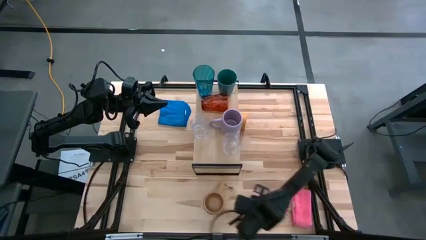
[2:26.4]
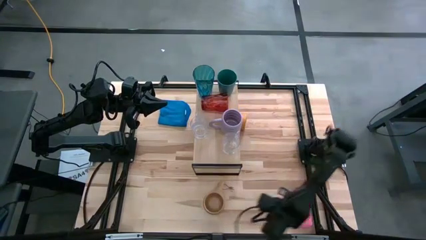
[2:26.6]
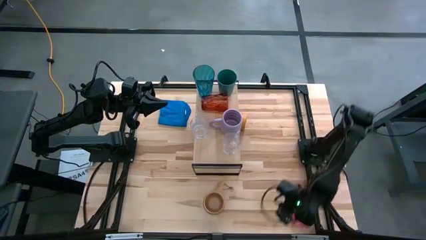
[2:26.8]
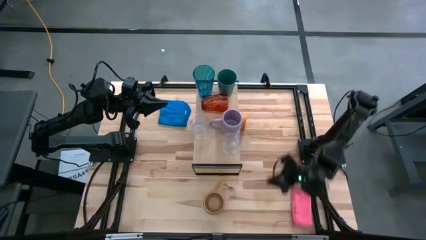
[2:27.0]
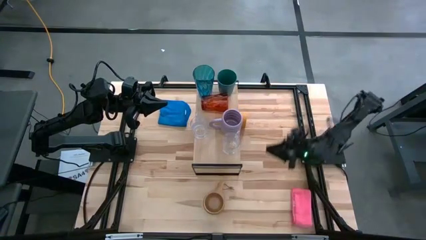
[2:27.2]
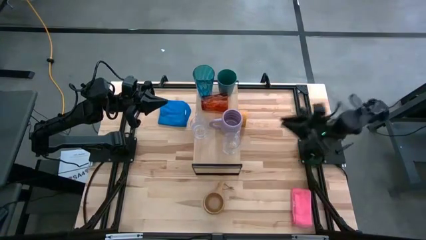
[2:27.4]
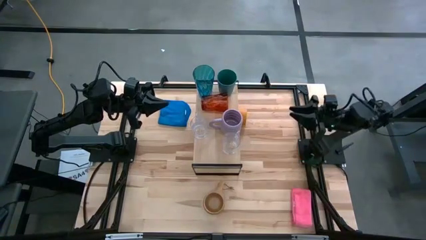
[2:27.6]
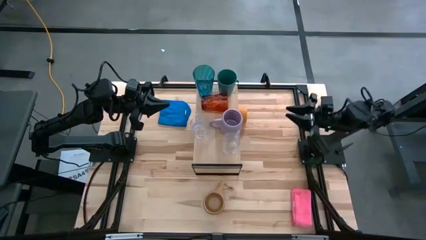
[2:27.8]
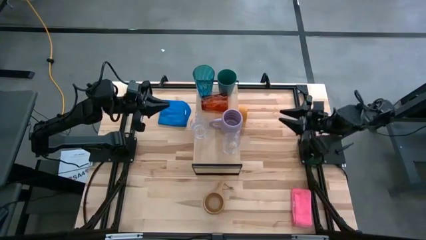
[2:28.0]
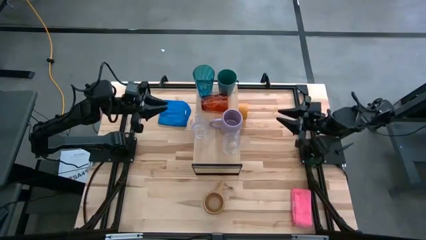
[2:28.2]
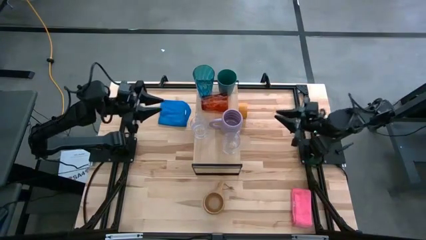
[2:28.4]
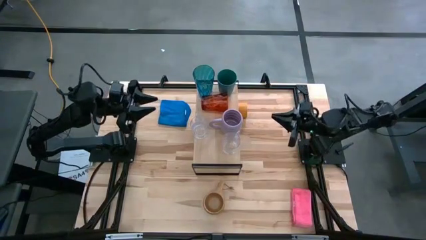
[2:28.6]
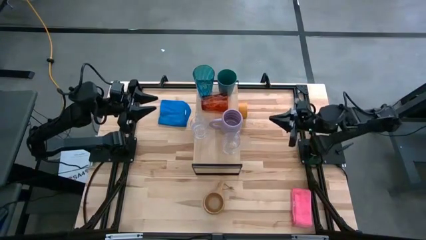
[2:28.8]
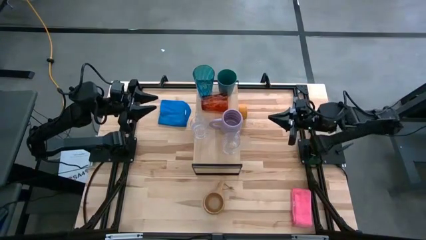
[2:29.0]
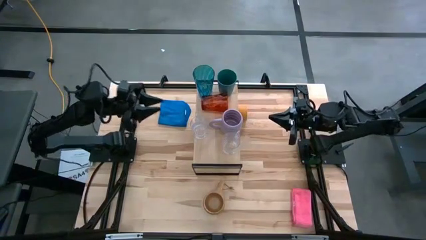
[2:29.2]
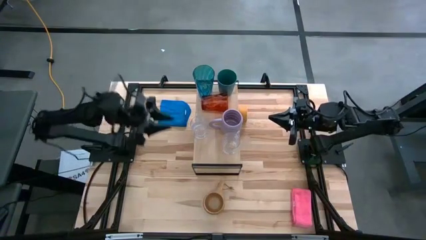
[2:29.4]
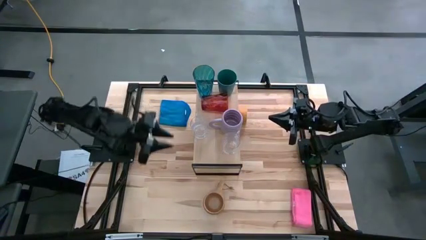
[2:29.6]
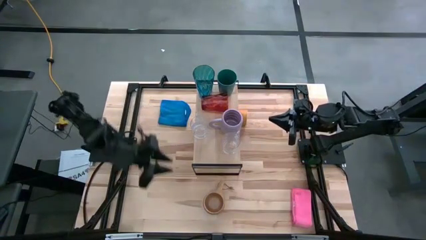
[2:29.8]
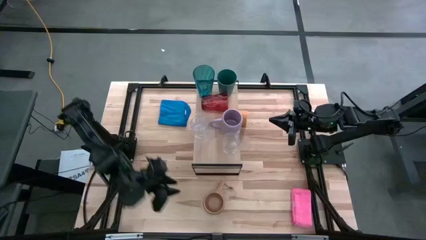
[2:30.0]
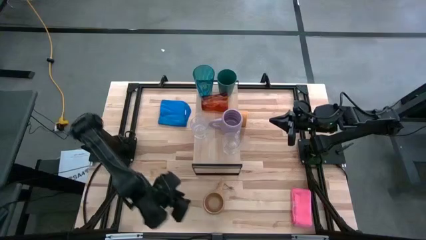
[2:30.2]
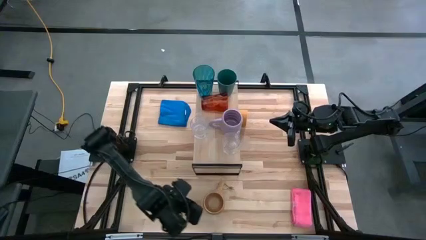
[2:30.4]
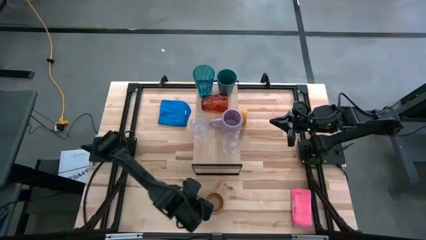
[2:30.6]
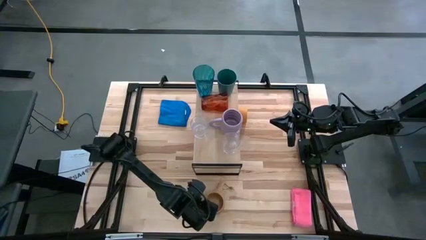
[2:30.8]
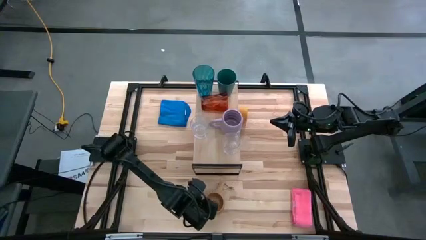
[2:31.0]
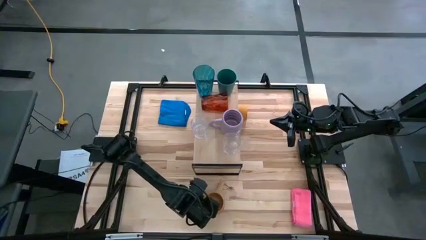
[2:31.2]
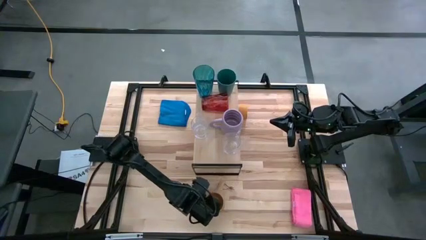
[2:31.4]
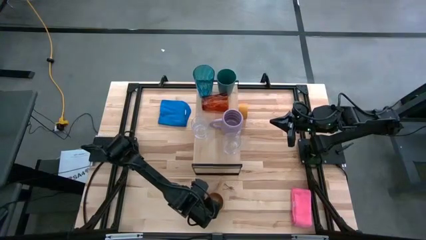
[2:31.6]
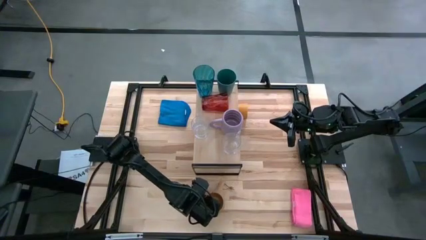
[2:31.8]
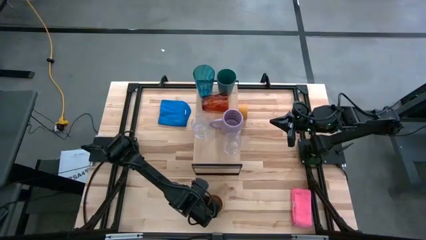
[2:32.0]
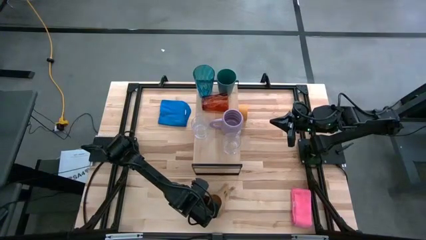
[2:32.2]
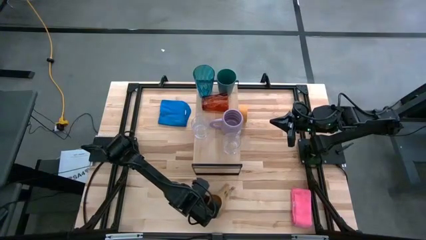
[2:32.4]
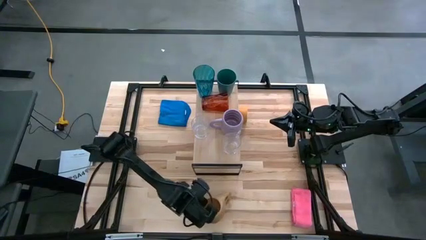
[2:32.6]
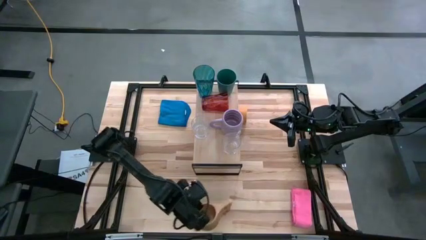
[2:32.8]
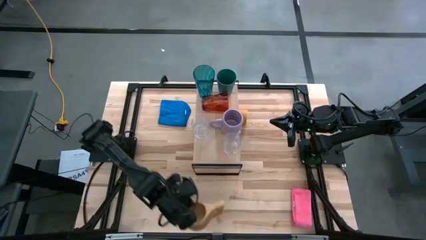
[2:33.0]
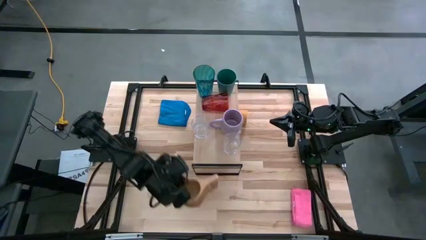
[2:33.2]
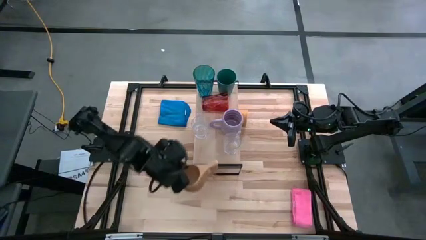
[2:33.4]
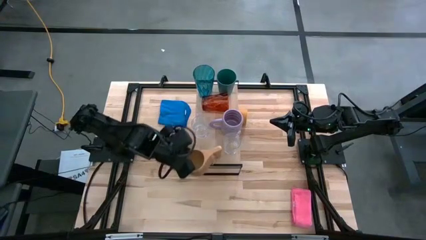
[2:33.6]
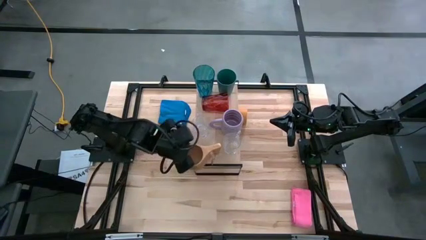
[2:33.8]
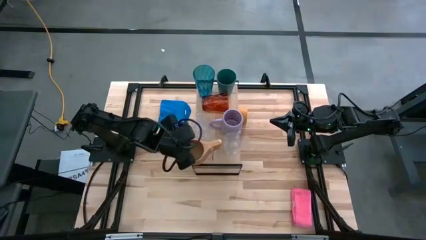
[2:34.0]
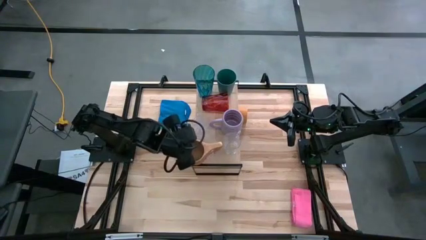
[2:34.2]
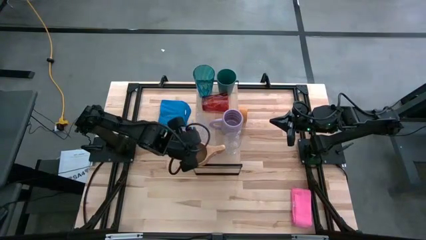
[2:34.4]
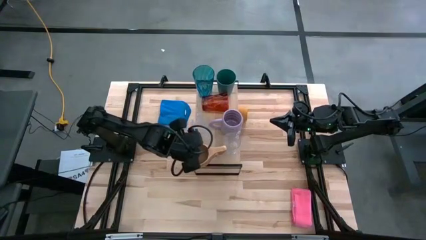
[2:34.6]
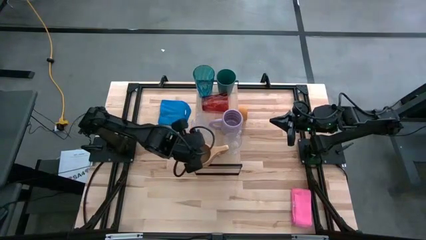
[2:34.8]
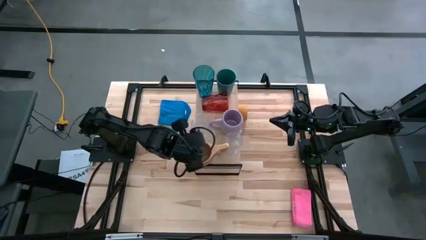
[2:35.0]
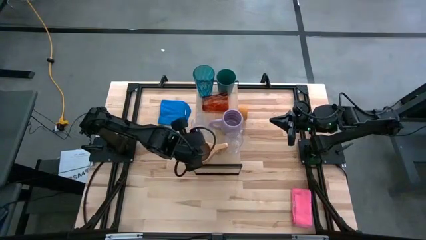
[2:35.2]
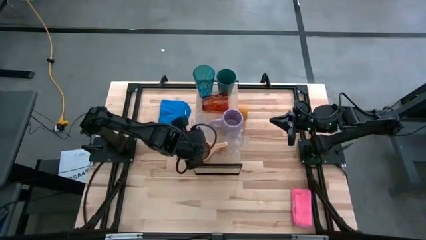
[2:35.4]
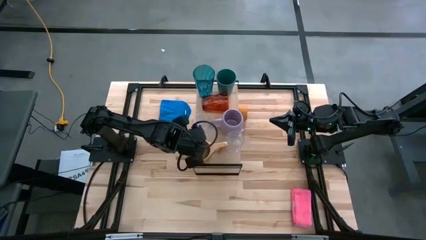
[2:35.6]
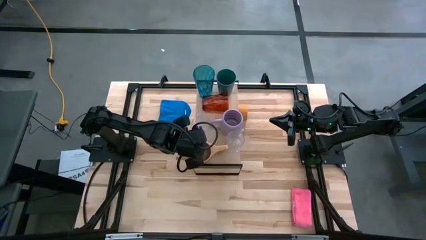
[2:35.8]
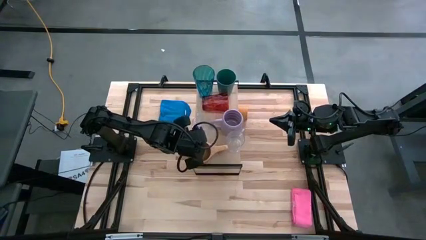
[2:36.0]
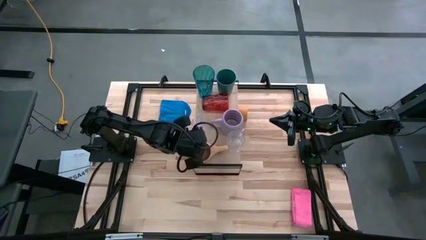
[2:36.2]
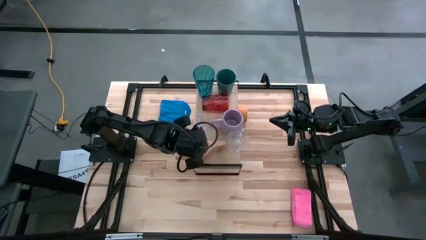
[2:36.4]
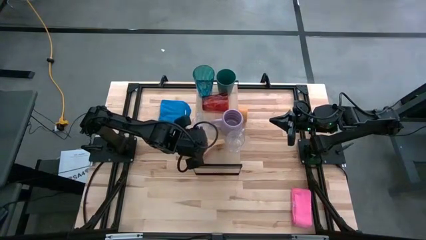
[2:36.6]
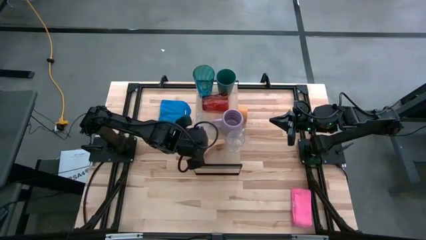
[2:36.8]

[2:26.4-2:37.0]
Task: Stack small to large cups/mugs on shelf
Put the brown mug on the shelf

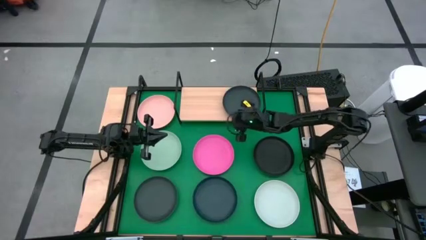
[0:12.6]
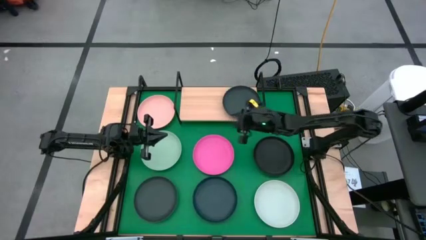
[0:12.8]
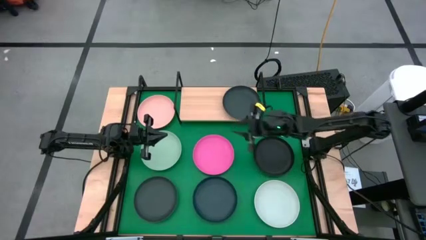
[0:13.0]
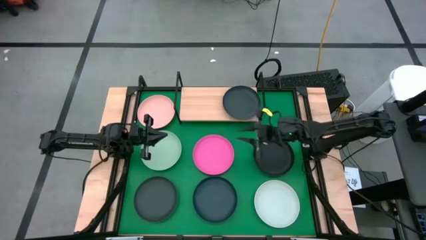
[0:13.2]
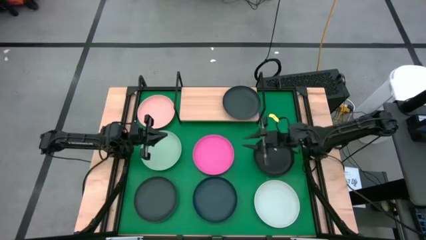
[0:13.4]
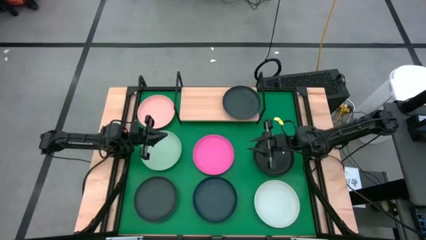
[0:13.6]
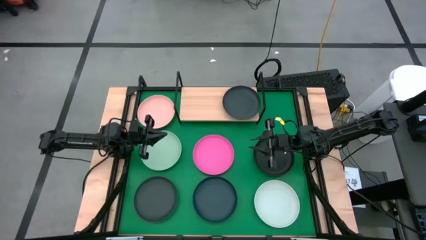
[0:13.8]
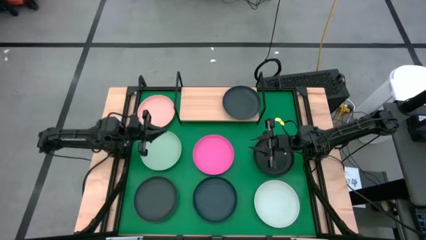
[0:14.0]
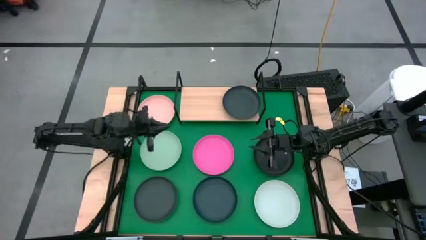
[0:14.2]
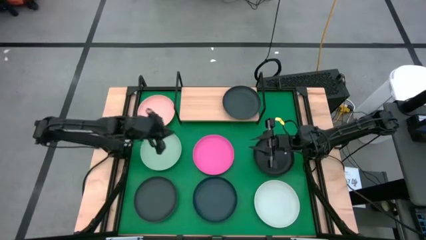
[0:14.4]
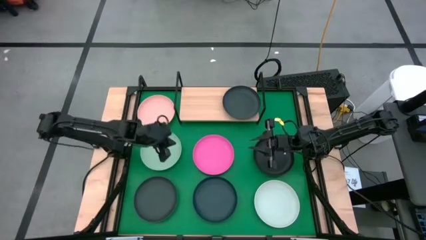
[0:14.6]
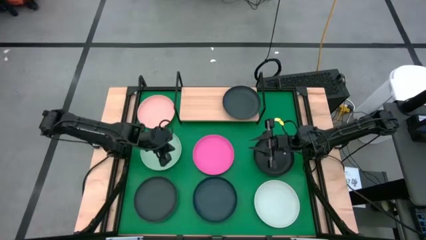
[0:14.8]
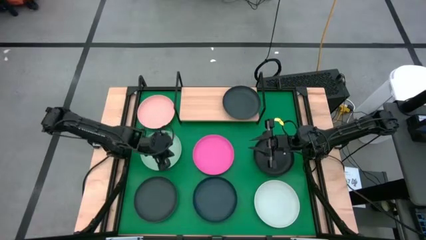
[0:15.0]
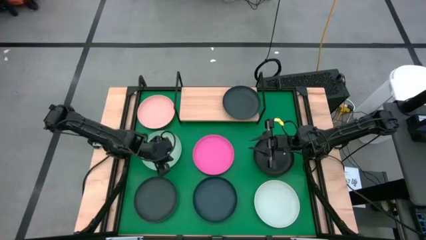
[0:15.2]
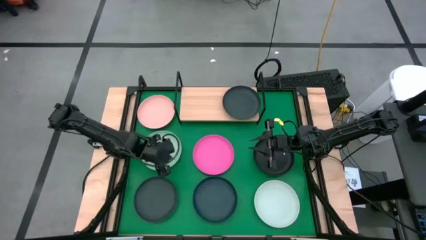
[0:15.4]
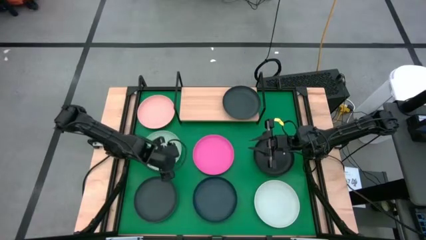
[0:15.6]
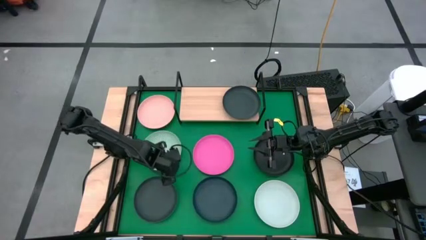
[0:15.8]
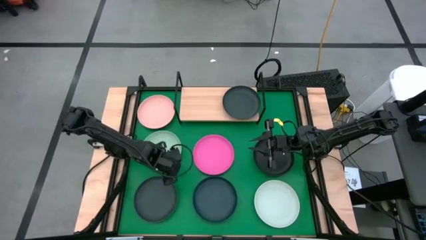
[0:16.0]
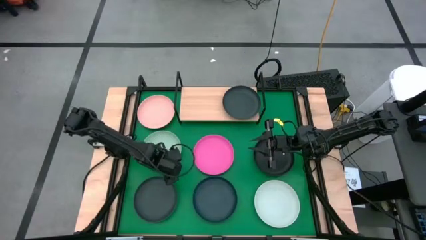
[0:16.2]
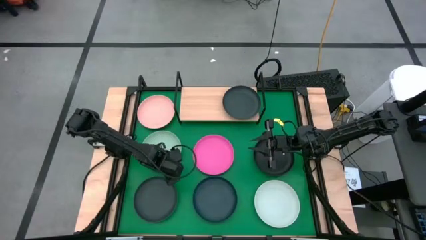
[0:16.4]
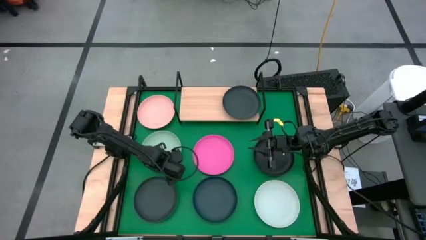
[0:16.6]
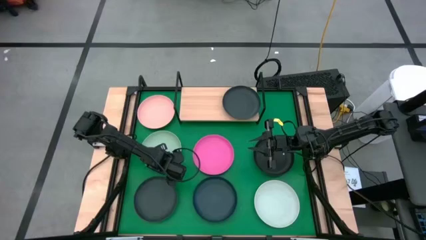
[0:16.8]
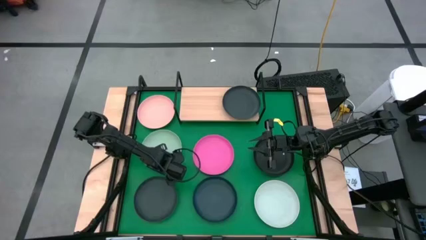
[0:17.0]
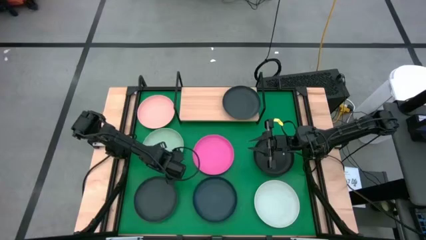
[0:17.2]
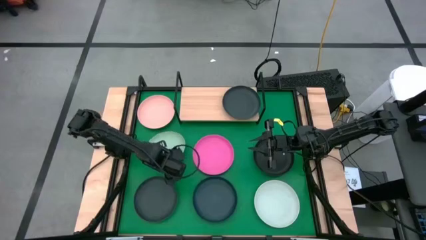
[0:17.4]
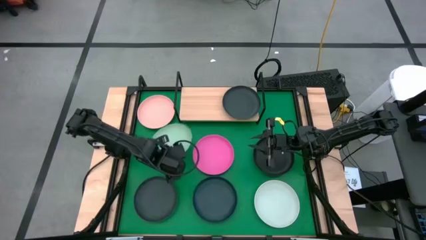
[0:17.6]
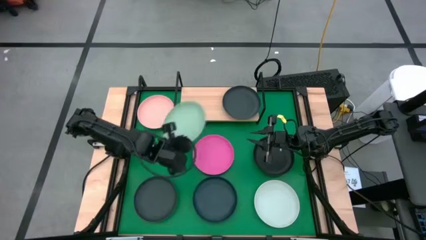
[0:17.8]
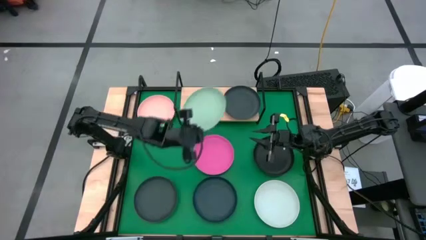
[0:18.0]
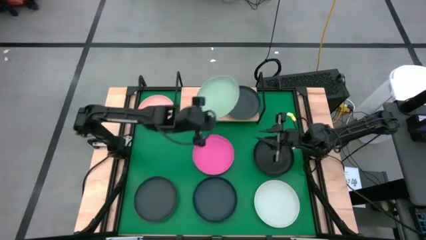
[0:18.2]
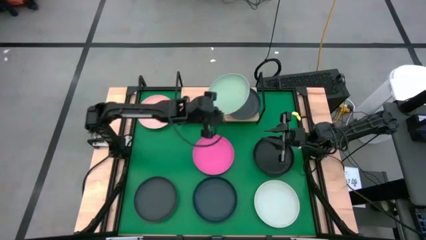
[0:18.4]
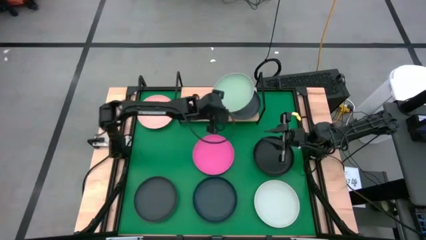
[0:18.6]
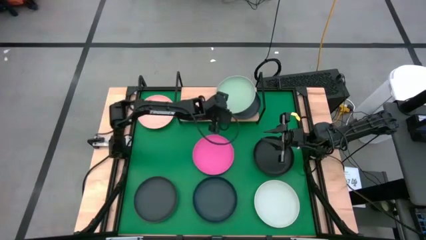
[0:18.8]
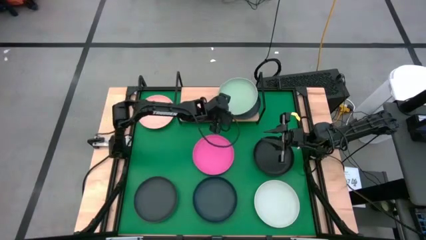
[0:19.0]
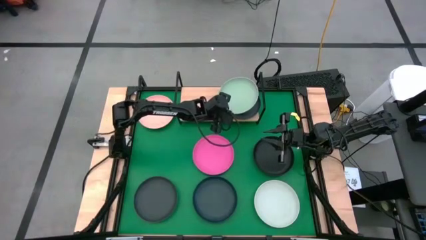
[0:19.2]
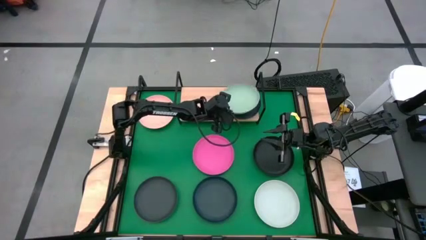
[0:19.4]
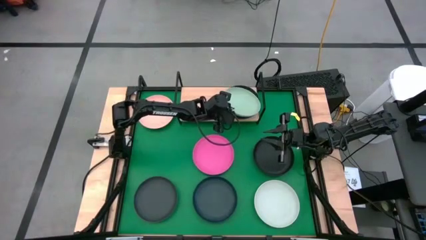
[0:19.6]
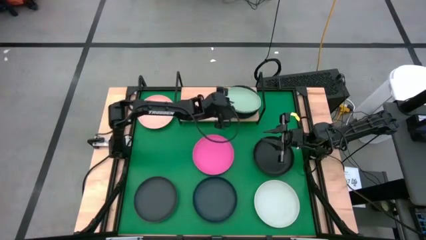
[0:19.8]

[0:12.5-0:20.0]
Task: Place and stack plates onto a shelf
Stack the light green plate on top of the dark blue plate on the shelf
